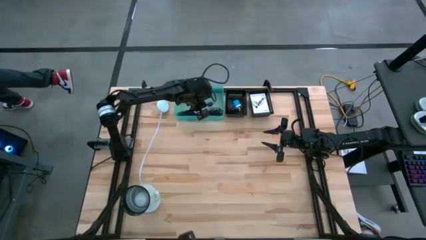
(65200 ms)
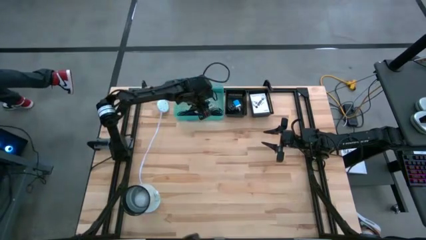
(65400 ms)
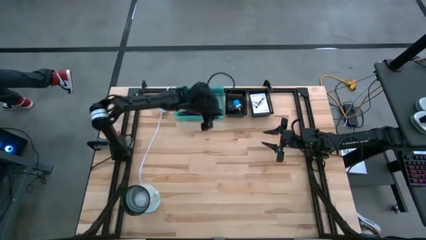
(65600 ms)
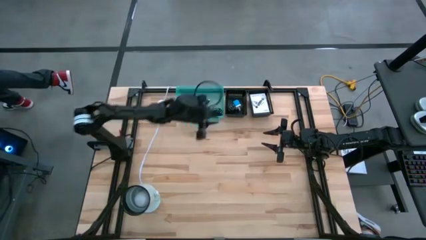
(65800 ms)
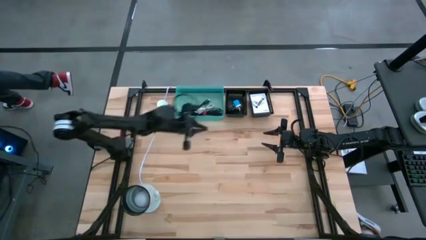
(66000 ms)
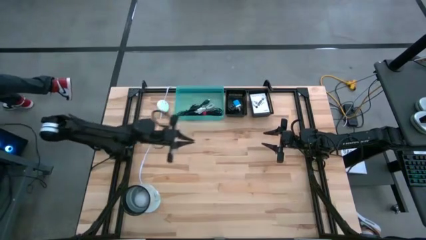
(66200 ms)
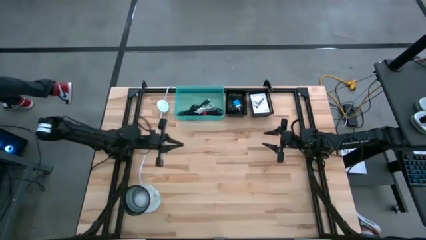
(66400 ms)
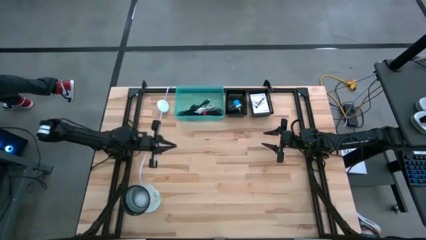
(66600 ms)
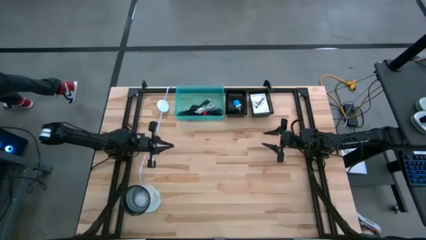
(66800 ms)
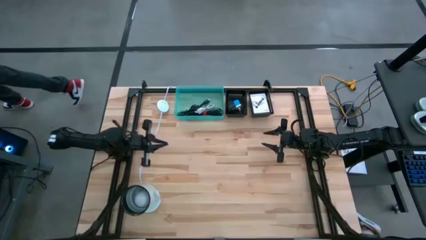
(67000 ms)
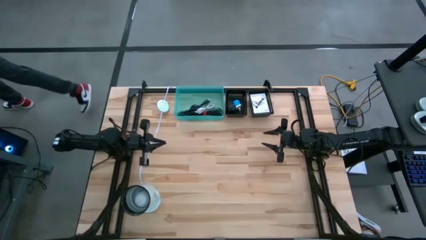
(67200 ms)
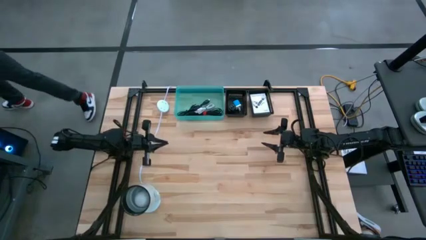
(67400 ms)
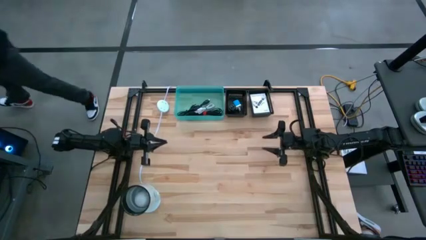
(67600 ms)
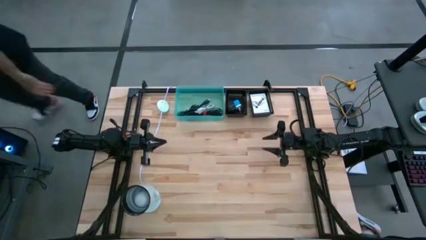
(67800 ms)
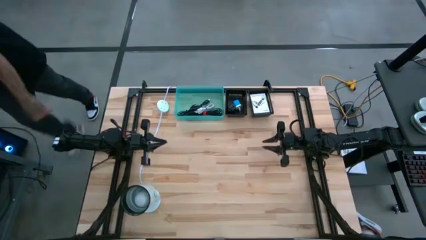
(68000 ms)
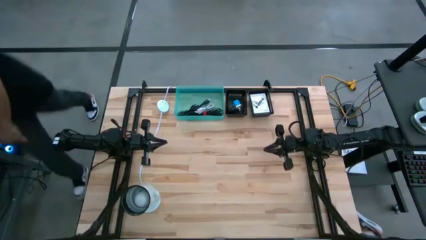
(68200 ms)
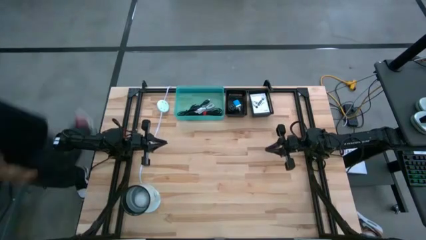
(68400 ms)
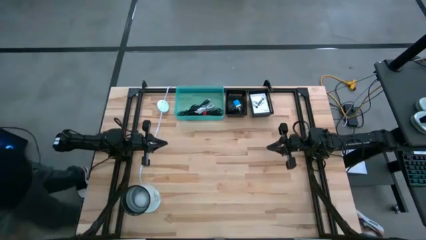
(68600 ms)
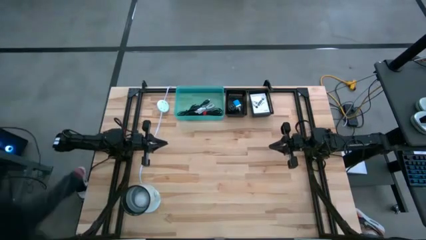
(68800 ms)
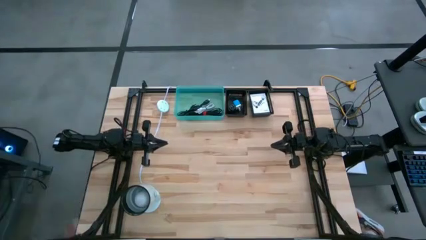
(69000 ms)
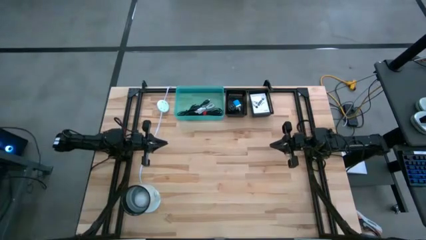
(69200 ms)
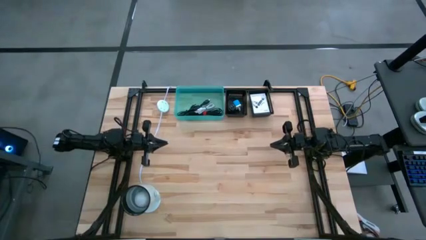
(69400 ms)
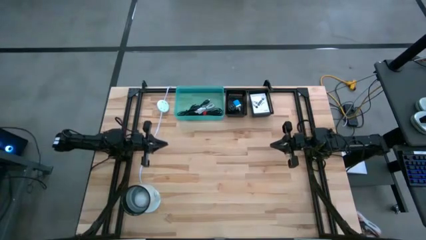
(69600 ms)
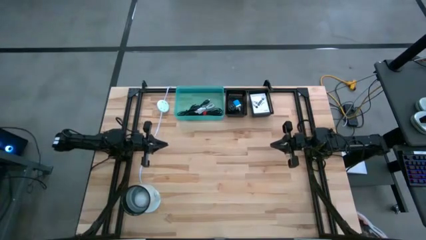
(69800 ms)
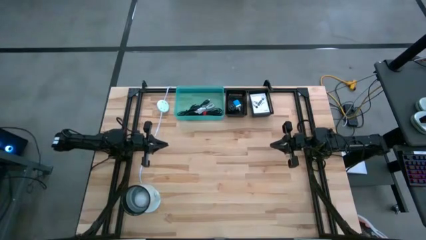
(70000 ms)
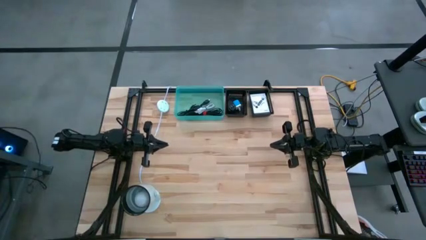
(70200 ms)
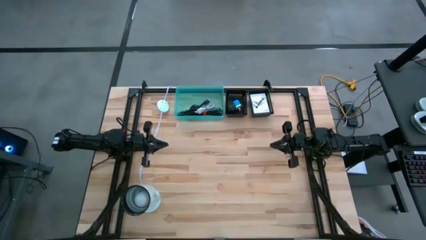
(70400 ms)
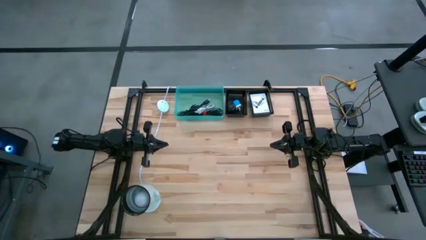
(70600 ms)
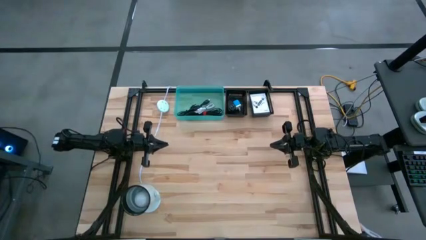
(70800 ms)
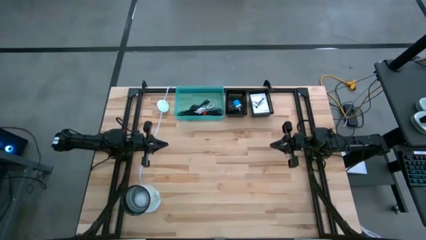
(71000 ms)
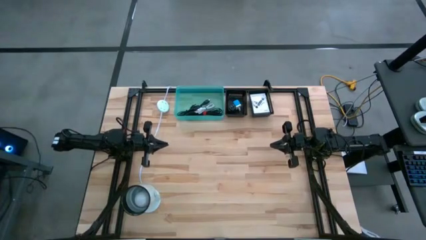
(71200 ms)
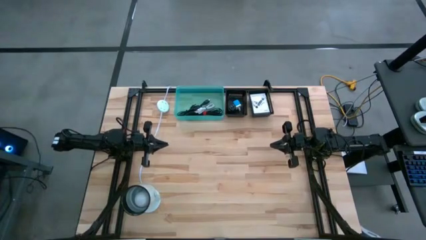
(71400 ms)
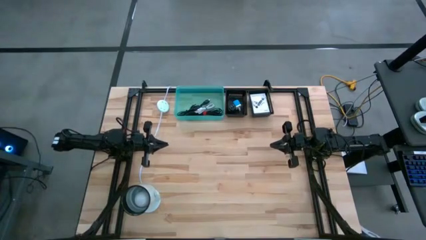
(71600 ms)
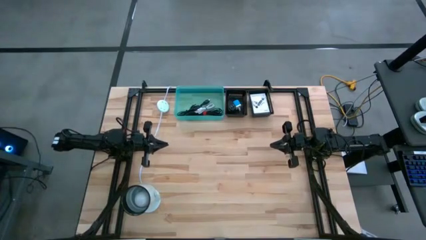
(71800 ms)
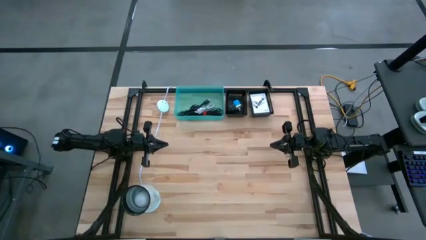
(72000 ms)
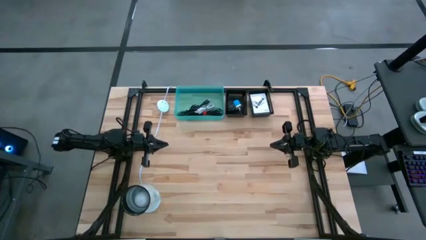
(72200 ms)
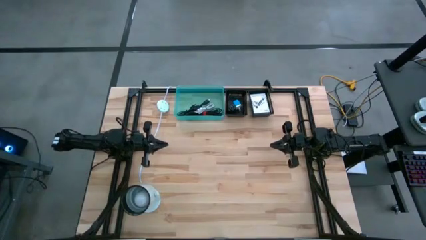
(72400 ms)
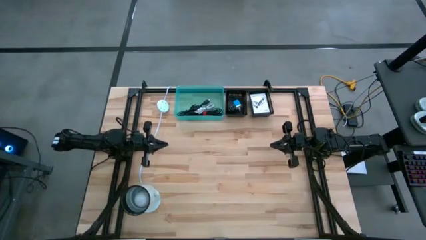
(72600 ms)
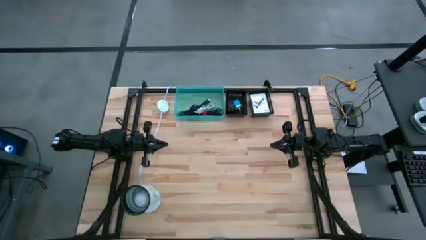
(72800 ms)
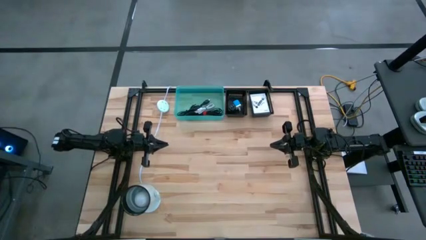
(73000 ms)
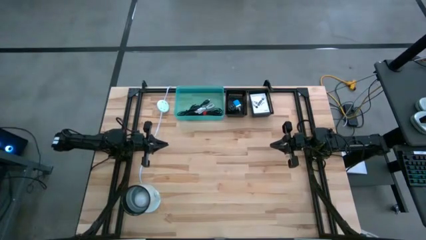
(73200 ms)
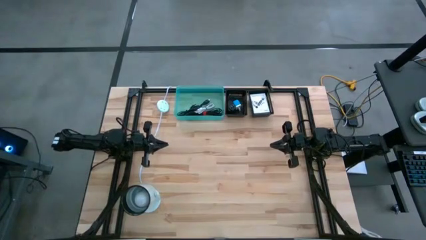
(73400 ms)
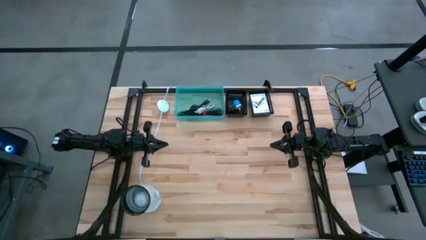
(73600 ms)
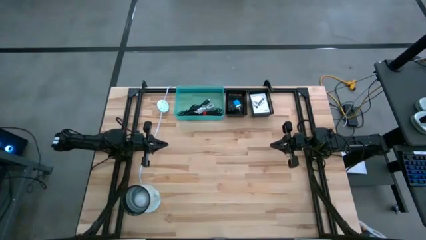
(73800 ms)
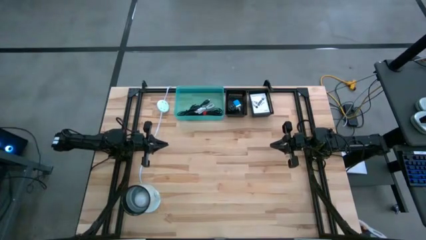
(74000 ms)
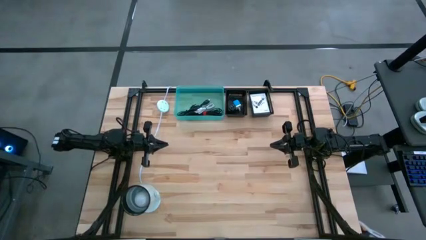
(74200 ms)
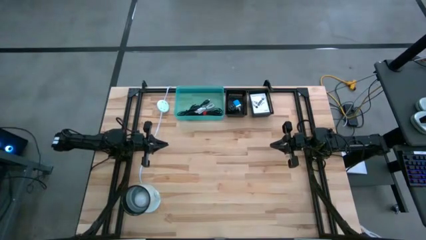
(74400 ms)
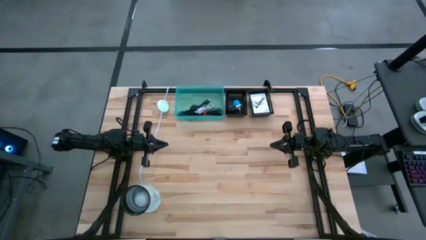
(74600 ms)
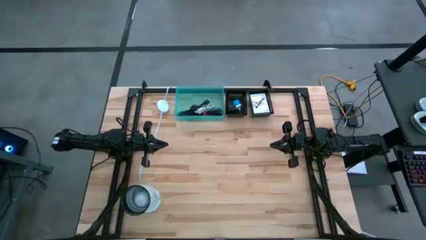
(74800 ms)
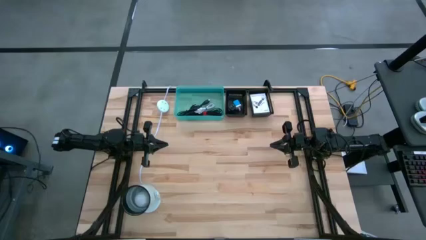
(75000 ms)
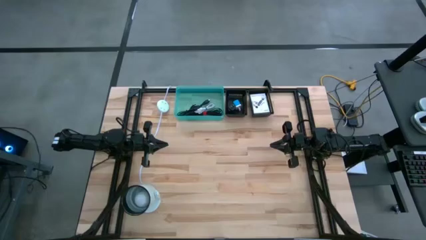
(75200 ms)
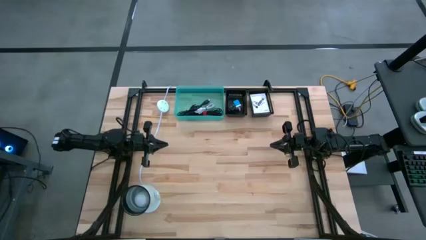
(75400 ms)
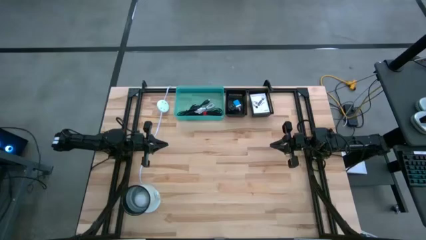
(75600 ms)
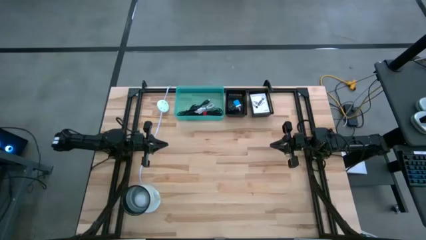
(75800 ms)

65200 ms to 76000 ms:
Task: Pick and place items into bin
Return to Home Position

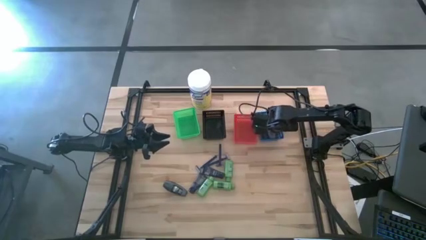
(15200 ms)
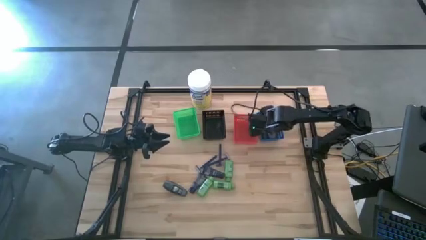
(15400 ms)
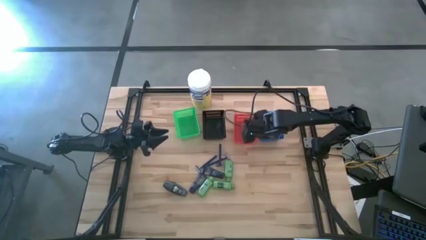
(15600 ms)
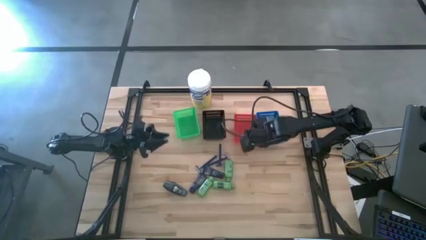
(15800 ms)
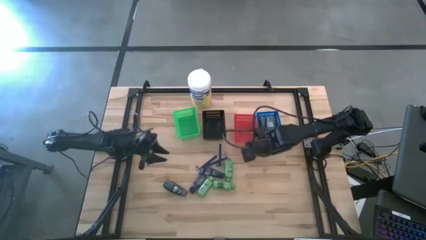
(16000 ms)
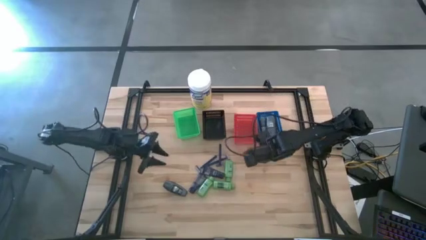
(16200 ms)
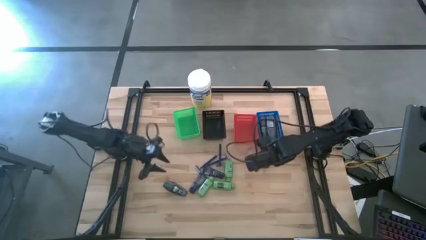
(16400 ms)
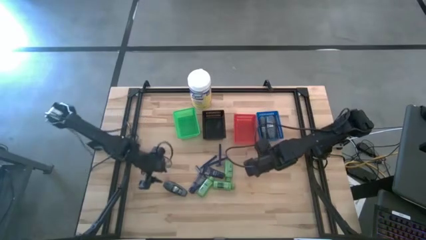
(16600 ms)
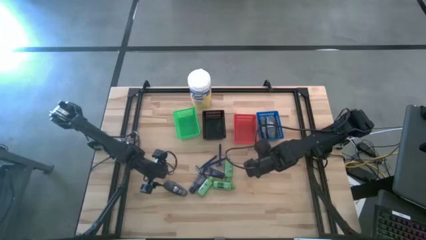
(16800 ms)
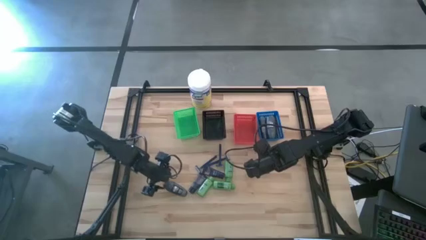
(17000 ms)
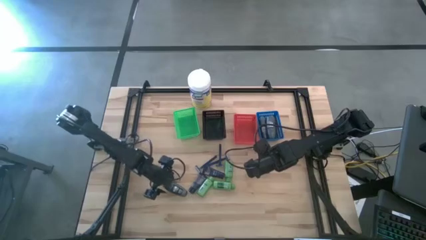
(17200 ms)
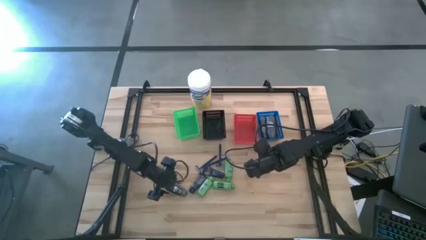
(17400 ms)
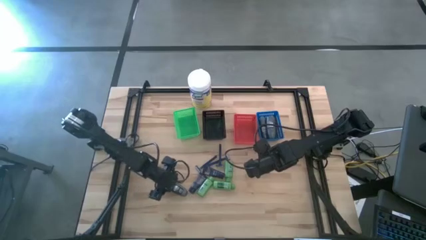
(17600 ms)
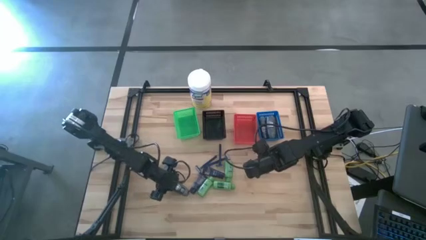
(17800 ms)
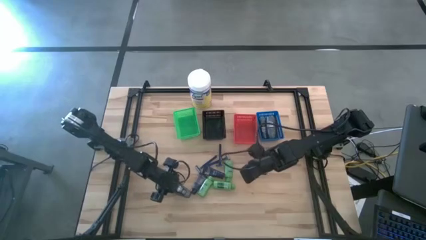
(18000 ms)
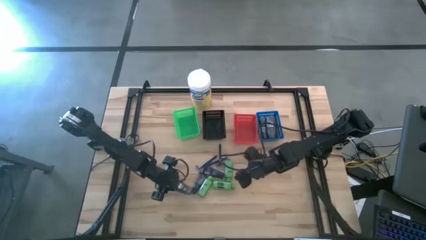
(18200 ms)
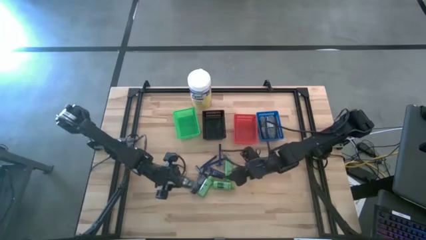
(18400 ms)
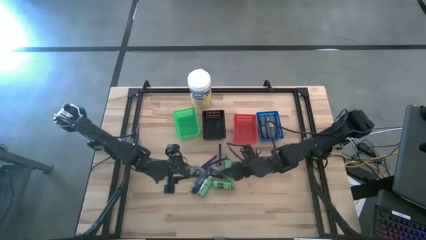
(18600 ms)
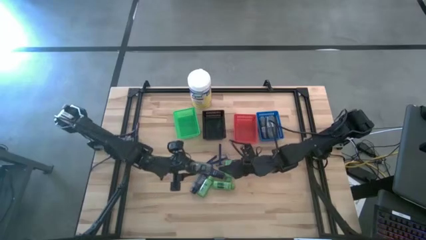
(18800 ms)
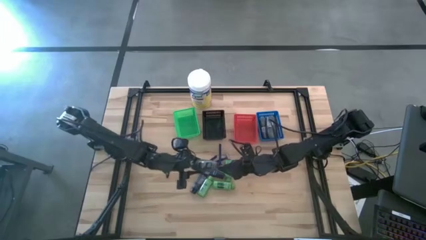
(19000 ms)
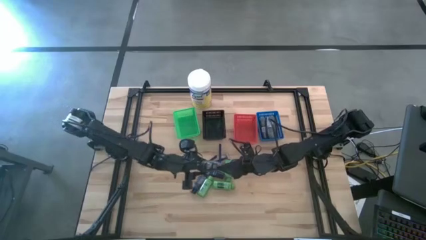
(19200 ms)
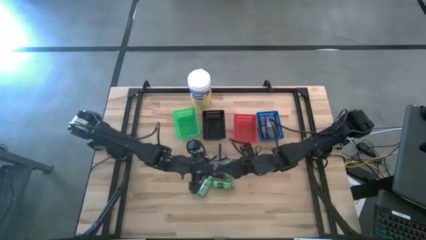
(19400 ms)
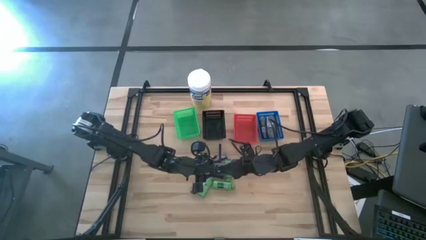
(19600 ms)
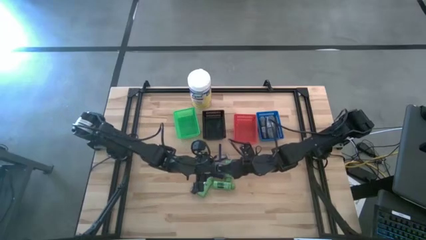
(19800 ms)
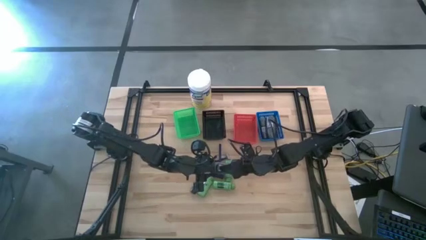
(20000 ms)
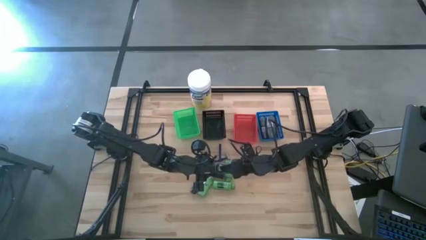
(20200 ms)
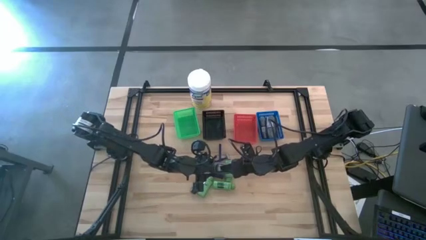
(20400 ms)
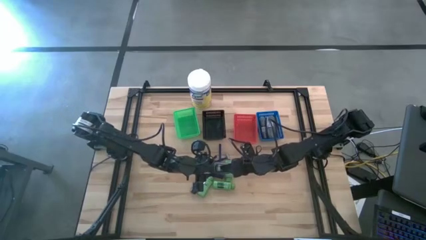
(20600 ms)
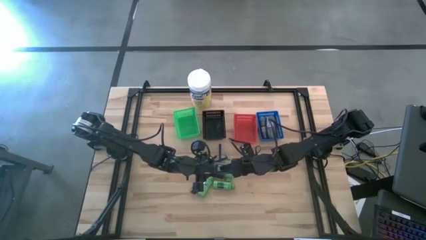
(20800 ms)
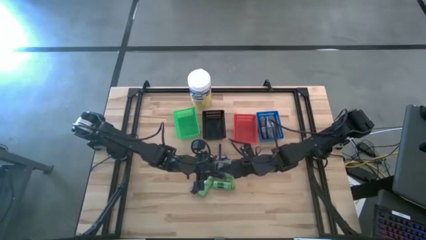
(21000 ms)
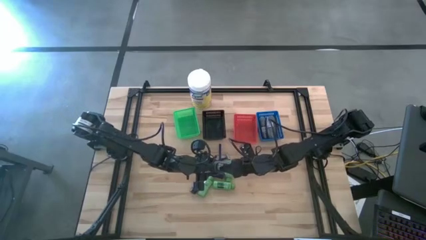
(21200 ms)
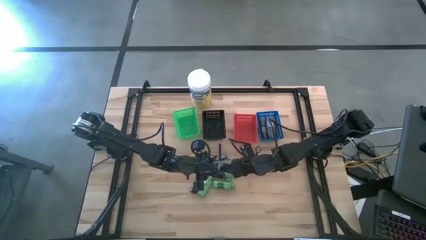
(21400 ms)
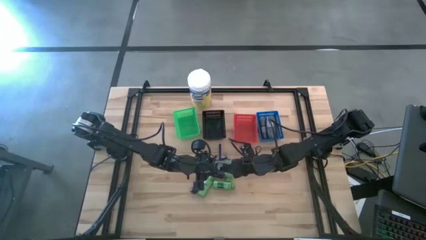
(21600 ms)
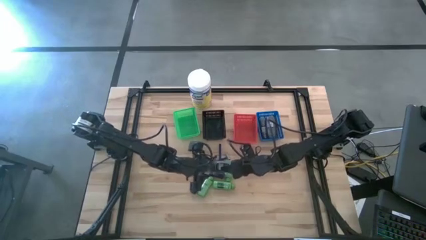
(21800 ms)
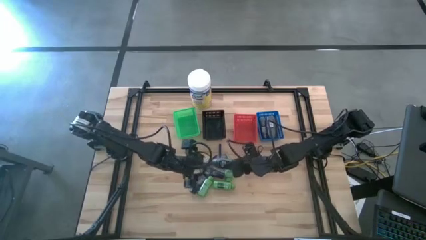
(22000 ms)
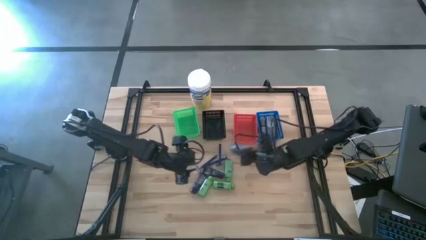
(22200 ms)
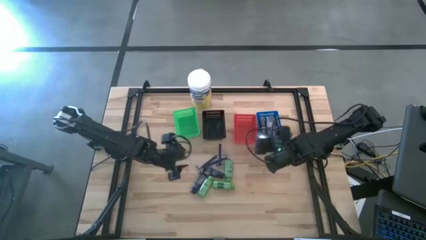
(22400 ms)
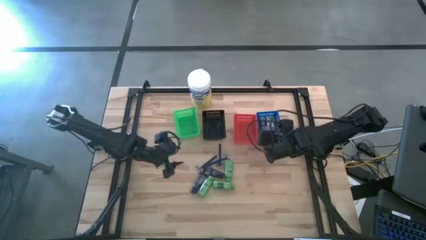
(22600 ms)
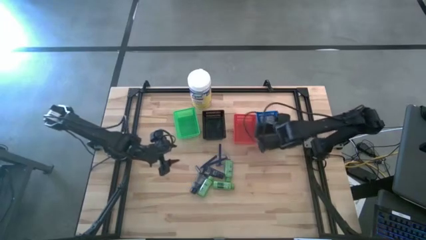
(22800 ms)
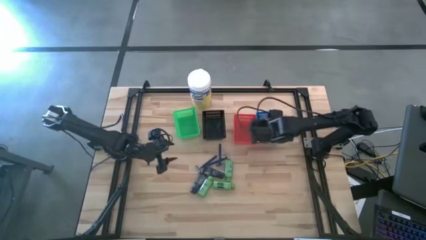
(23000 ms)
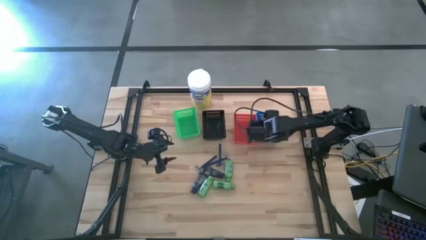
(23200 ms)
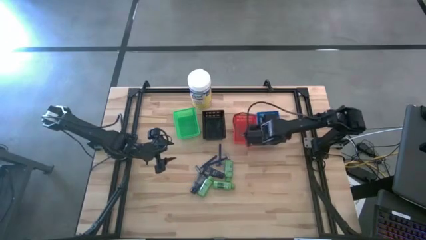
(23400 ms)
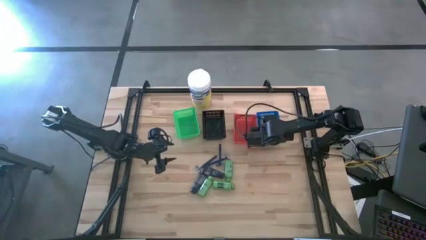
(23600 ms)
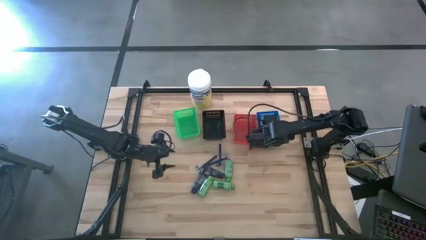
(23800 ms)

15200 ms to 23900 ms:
Task: Pick & Place Travel size toiletries
Put the black deodorant into the blue bin
